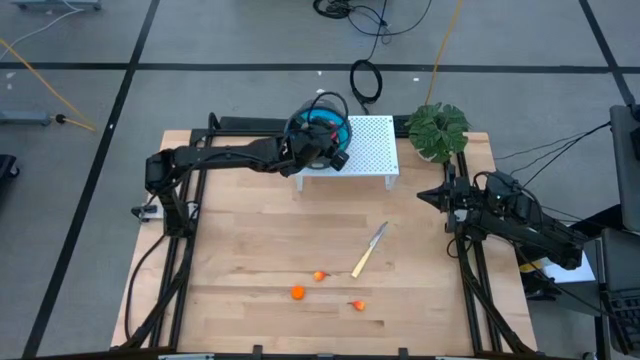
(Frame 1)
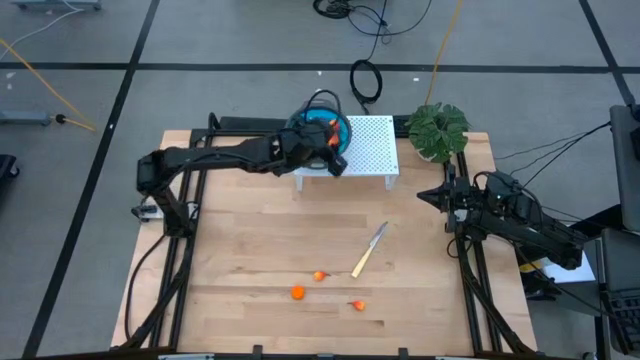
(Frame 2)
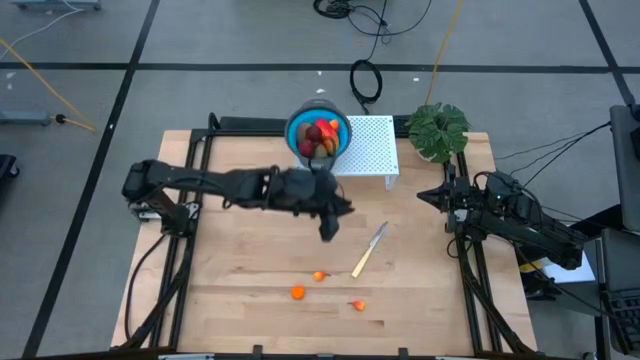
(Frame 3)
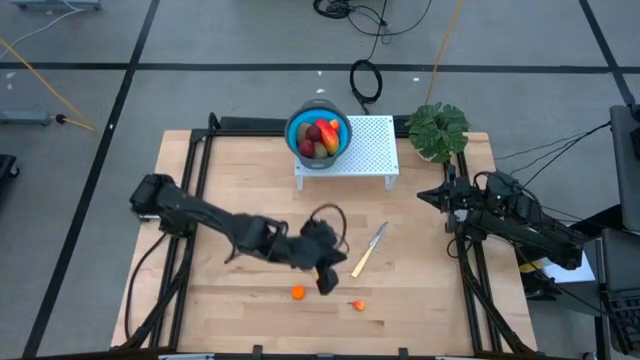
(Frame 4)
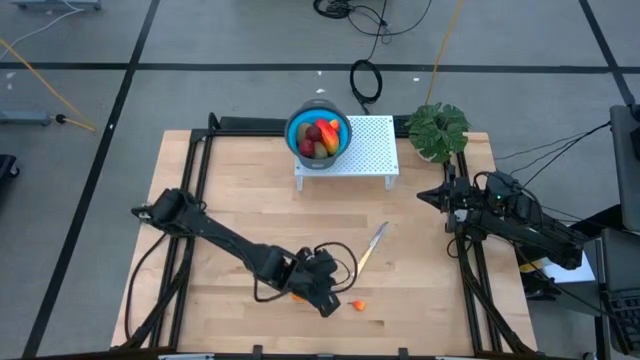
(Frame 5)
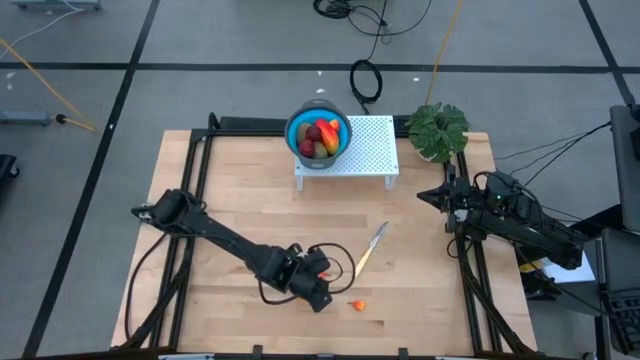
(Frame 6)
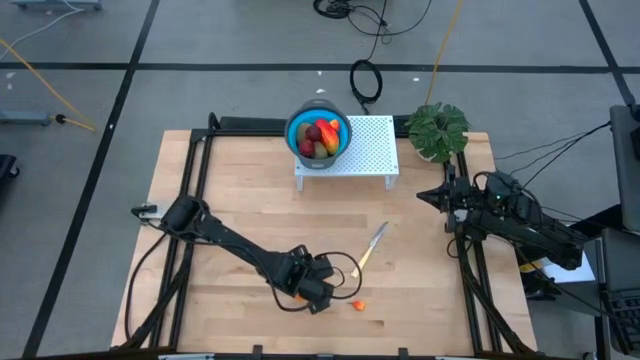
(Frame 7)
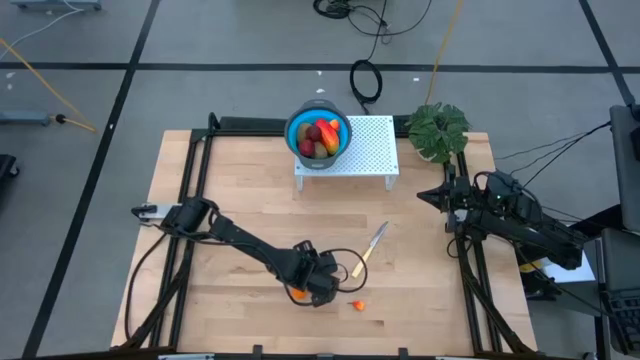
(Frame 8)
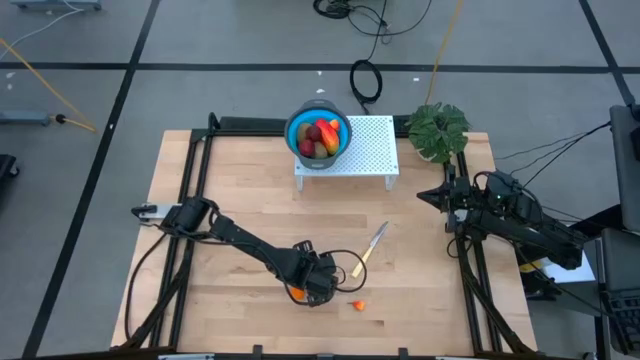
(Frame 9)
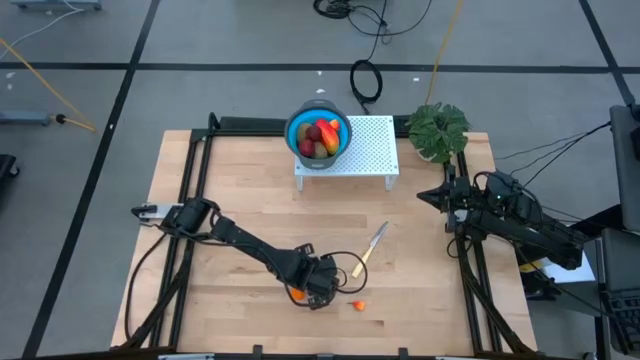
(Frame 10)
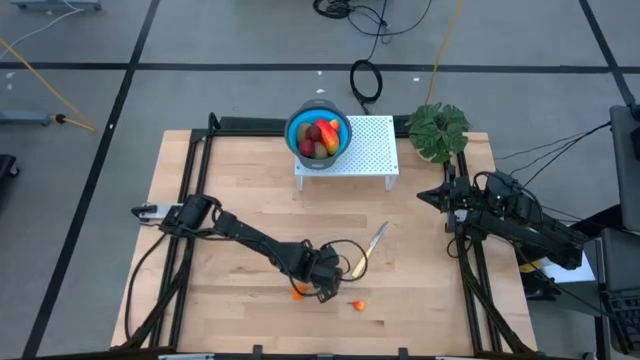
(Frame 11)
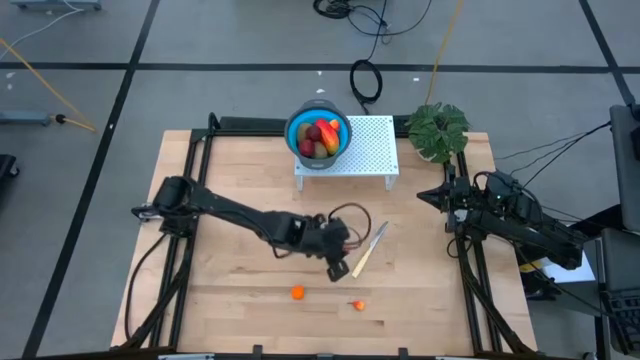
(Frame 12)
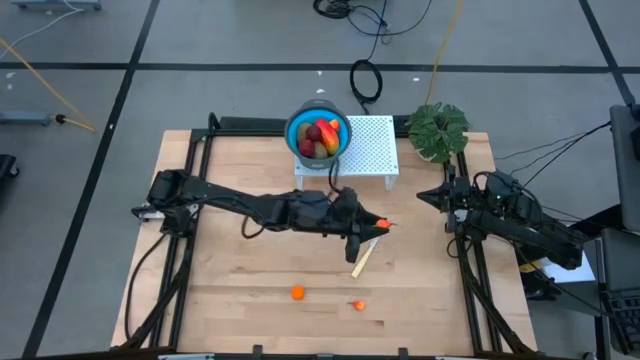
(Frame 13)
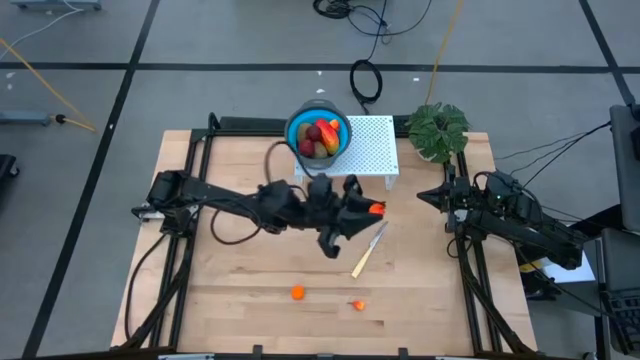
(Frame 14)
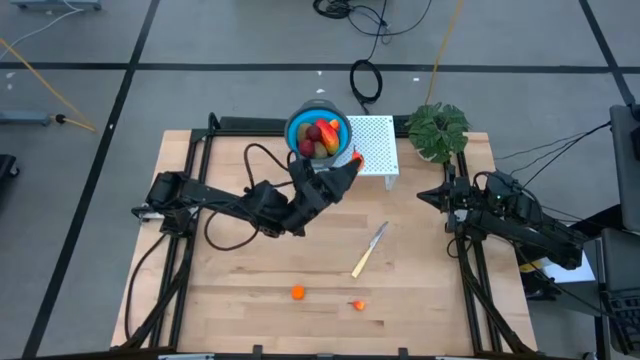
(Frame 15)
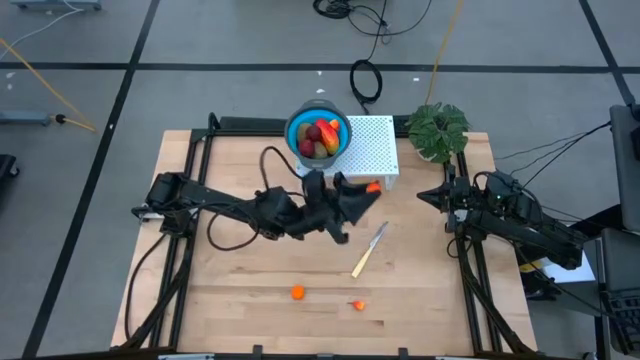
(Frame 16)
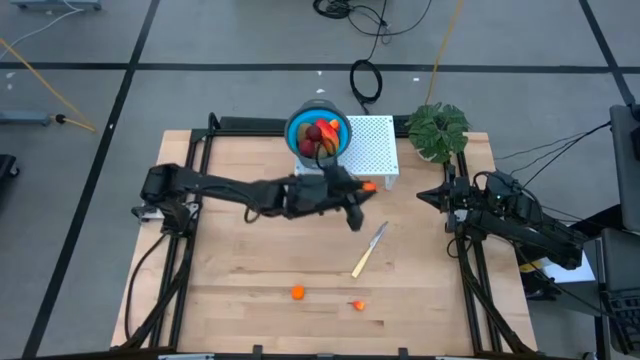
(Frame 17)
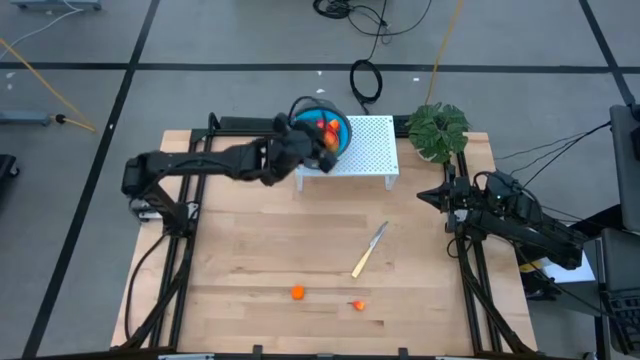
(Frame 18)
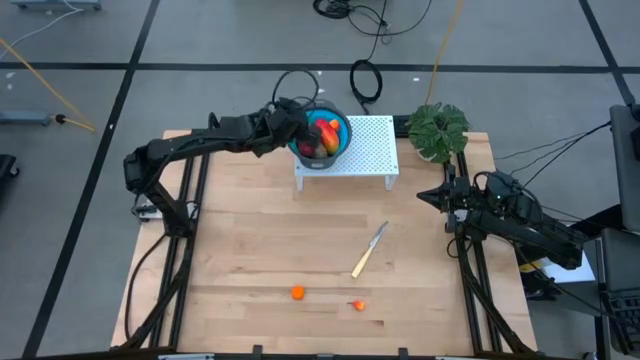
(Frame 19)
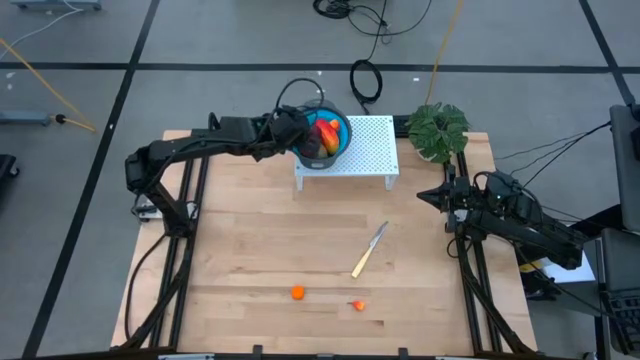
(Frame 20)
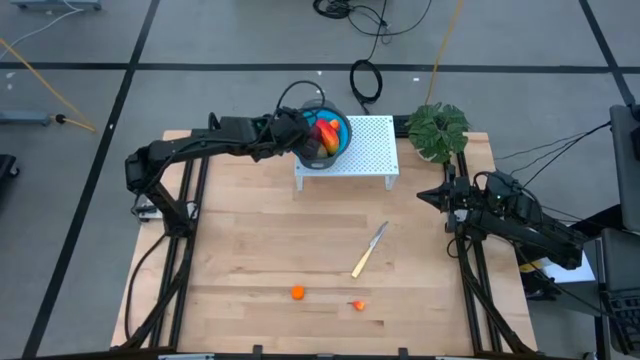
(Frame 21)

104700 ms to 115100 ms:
Task: Pick & Place Fruit
Put the orange peach into the blue strainer bowl on the shelf

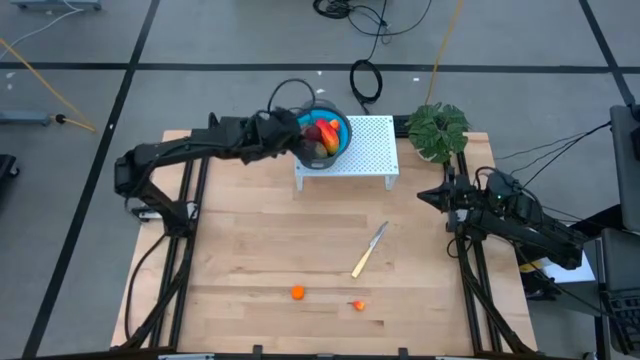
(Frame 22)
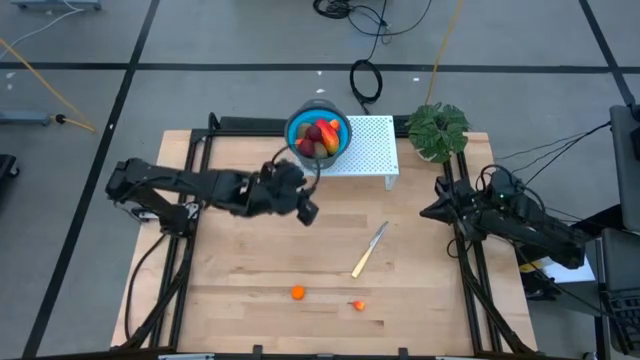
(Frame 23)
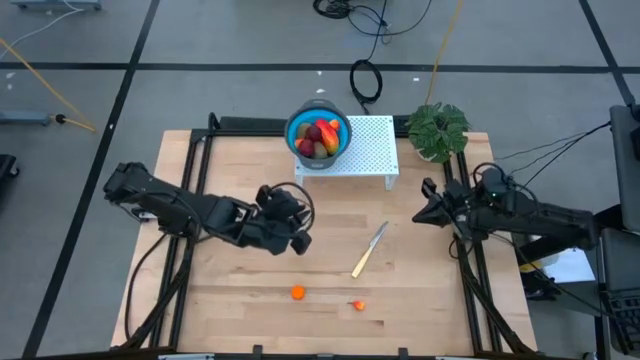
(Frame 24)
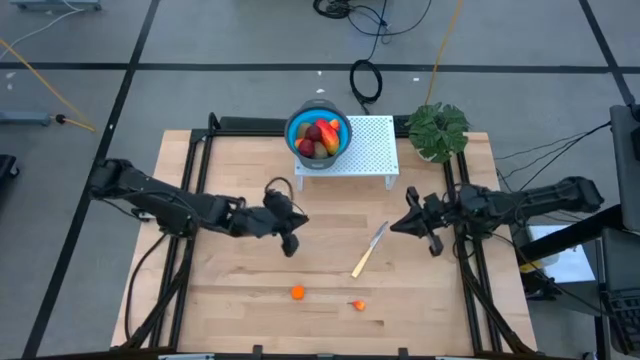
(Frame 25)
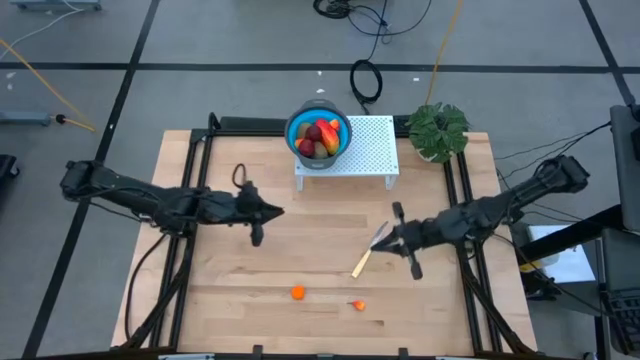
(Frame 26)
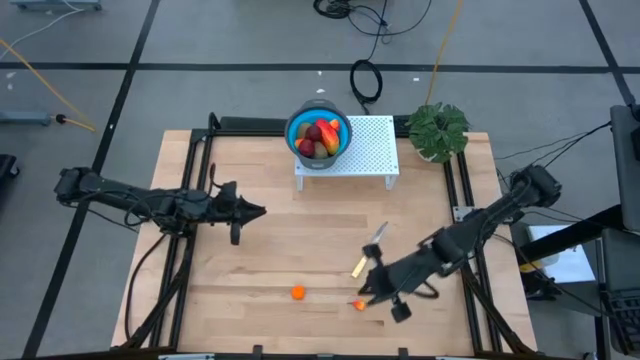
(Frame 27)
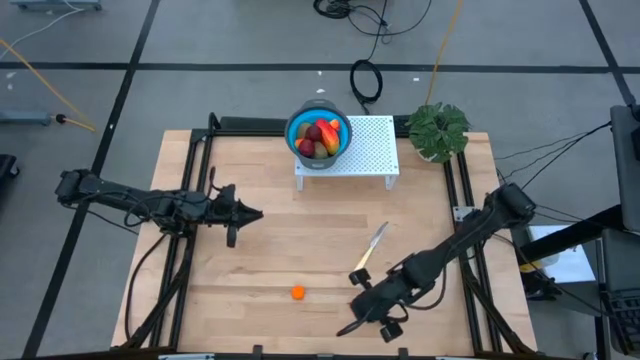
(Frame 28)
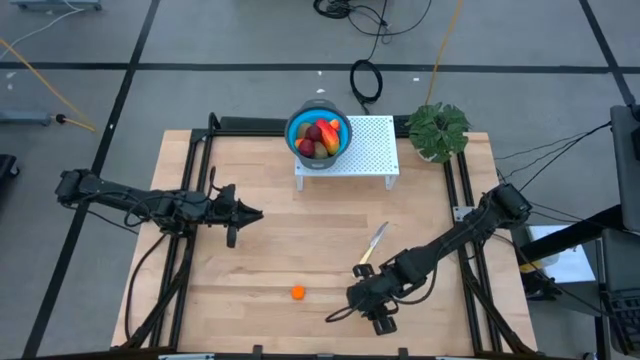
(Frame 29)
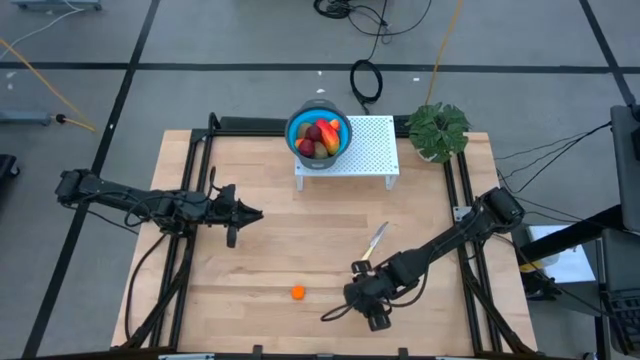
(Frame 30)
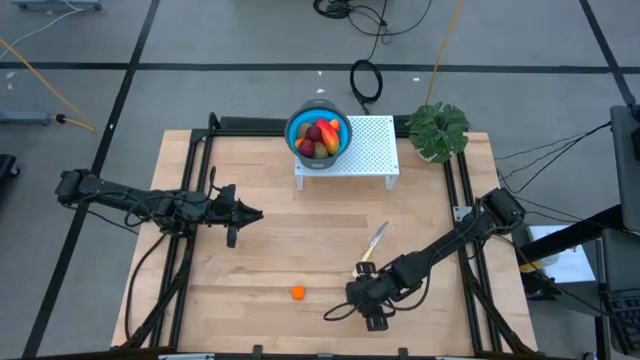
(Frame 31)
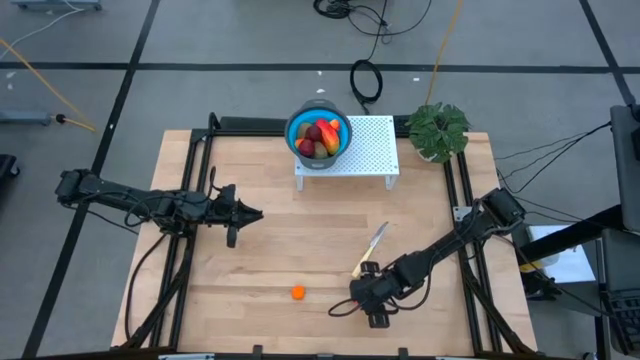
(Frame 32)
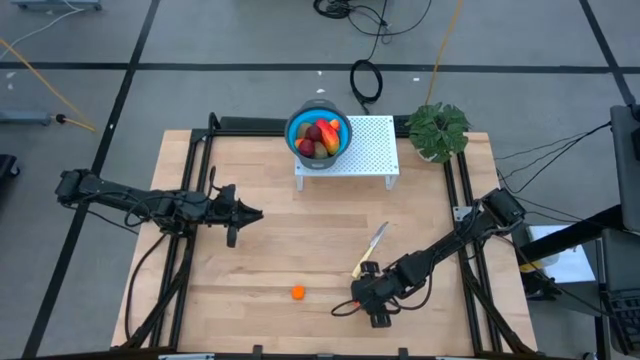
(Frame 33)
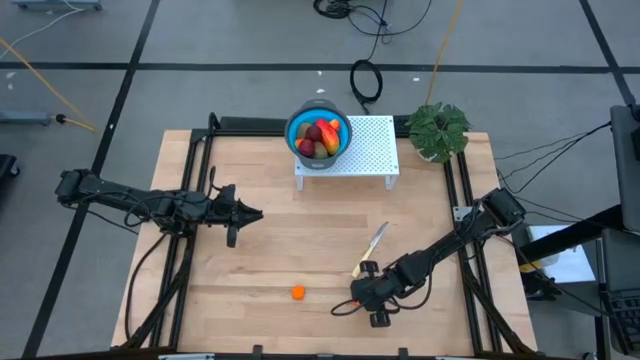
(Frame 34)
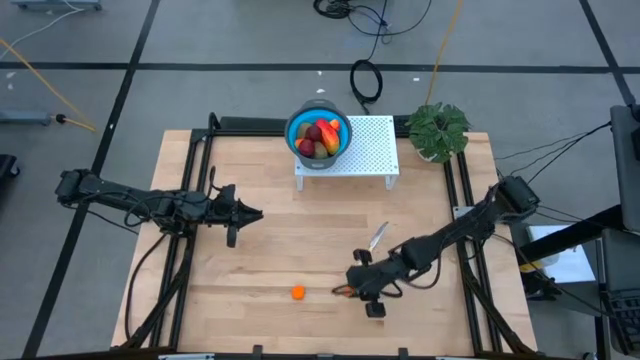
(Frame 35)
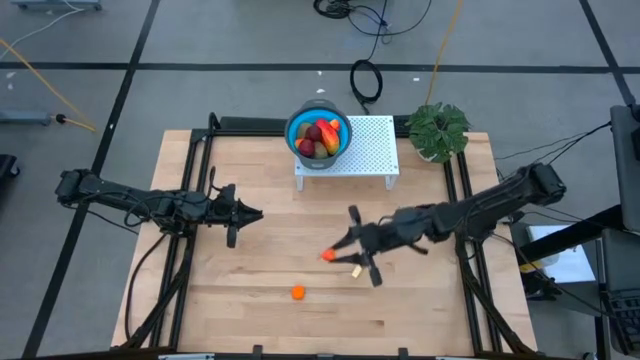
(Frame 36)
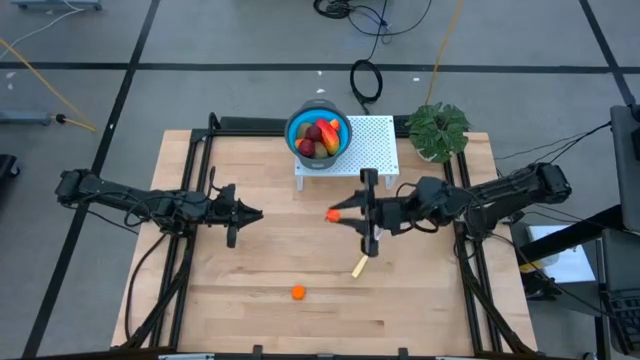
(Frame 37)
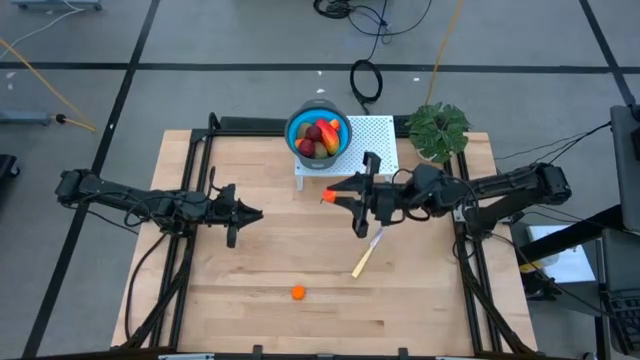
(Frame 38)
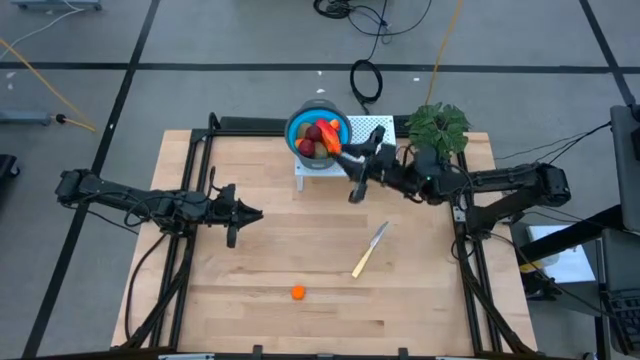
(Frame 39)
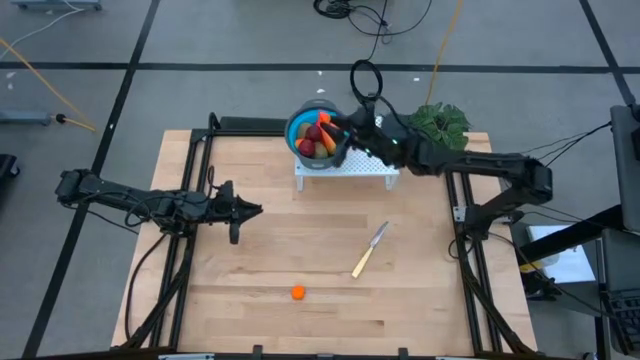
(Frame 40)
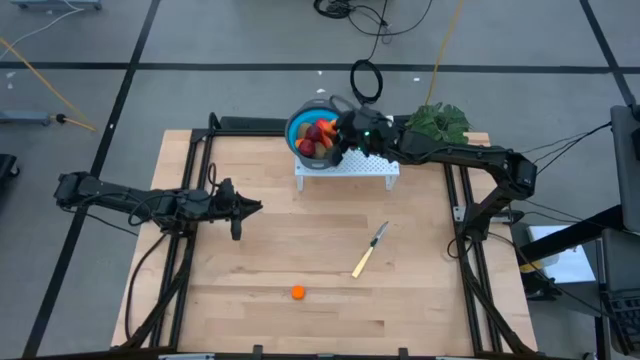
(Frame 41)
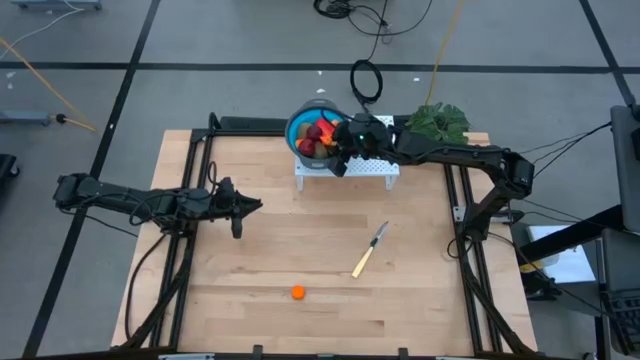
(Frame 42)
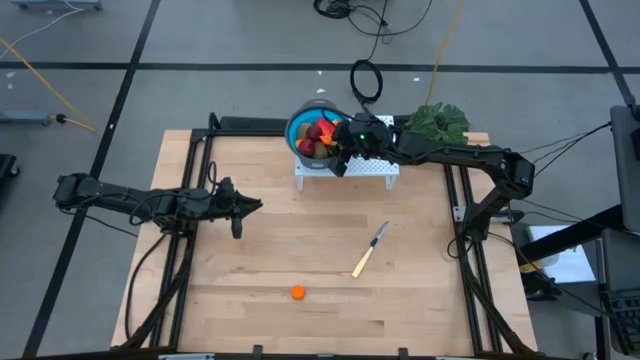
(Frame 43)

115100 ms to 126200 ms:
Put the orange peach into the blue strainer bowl on the shelf
